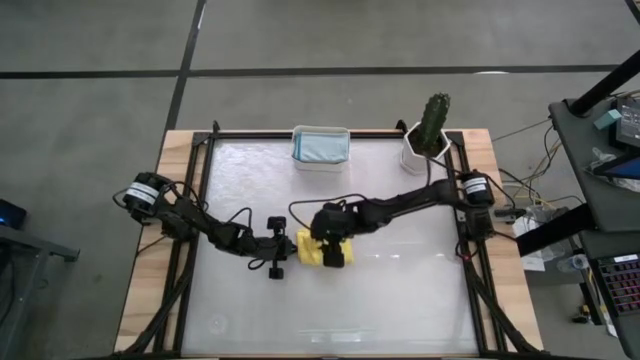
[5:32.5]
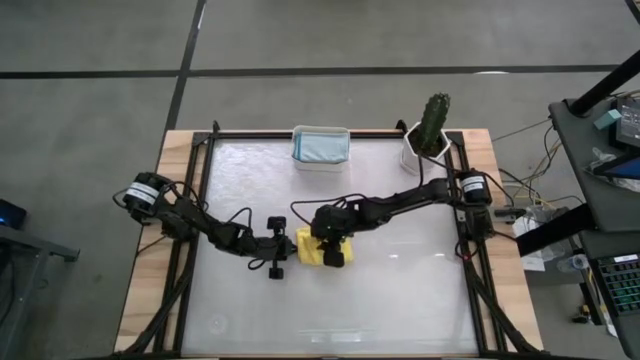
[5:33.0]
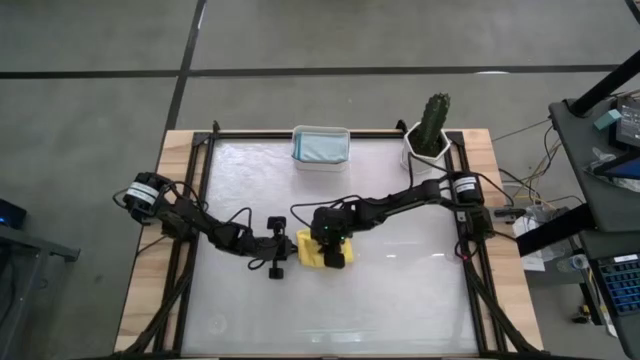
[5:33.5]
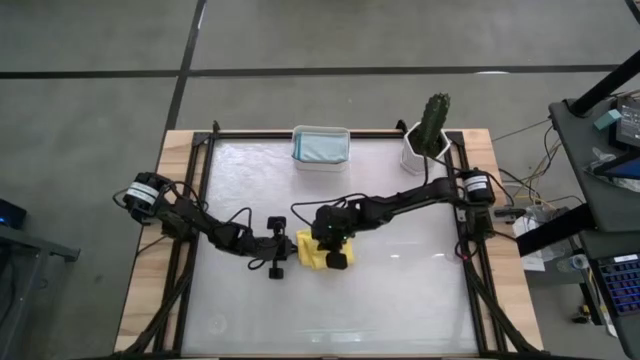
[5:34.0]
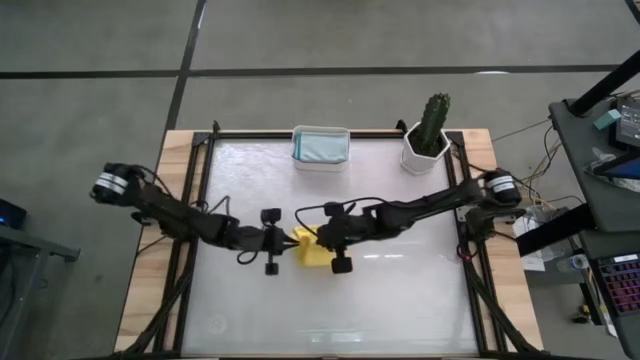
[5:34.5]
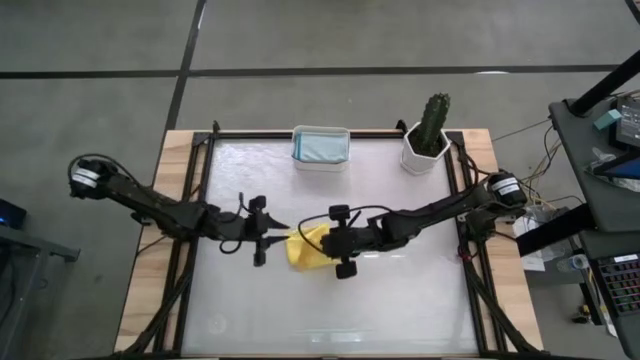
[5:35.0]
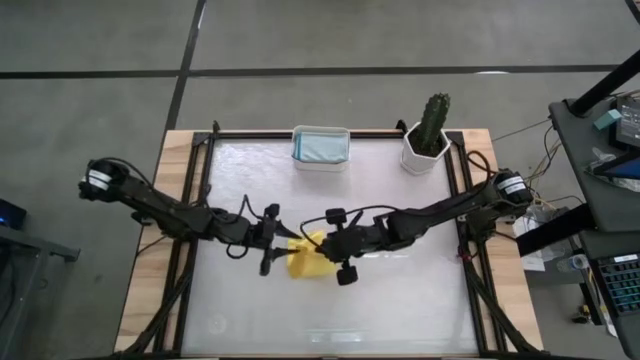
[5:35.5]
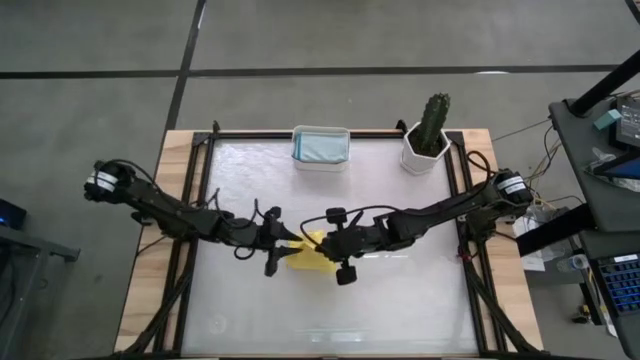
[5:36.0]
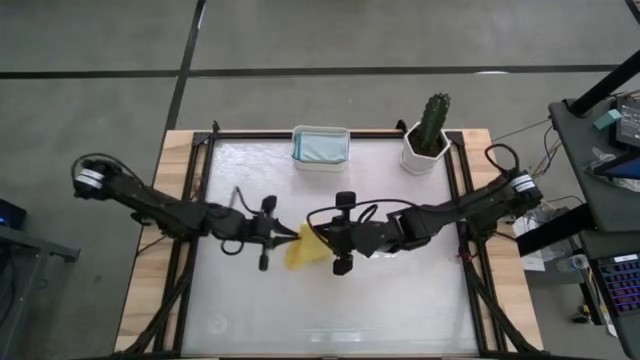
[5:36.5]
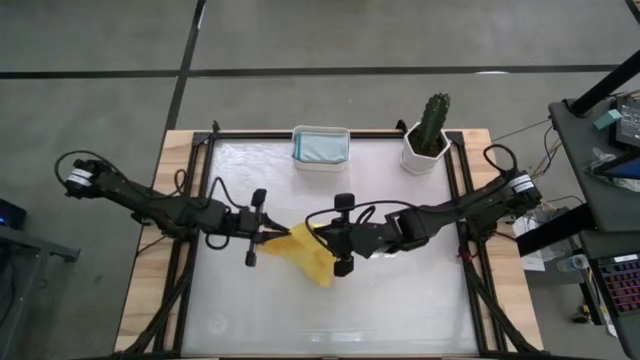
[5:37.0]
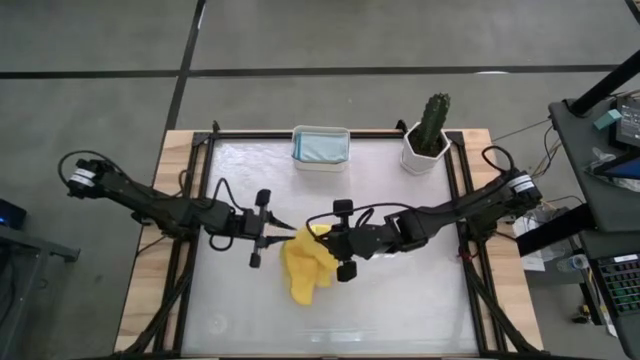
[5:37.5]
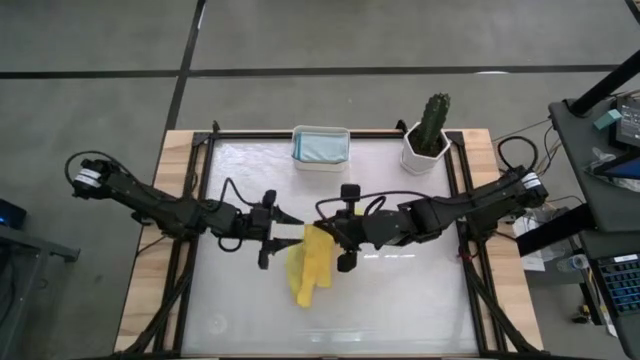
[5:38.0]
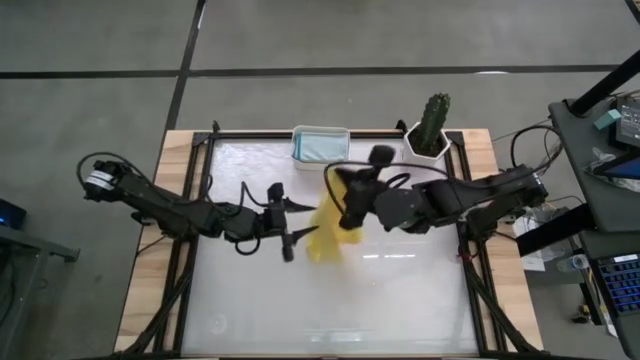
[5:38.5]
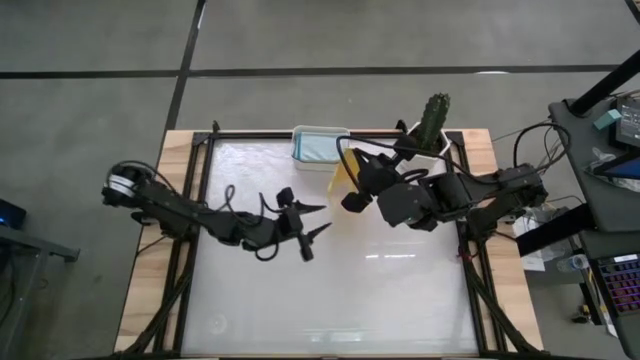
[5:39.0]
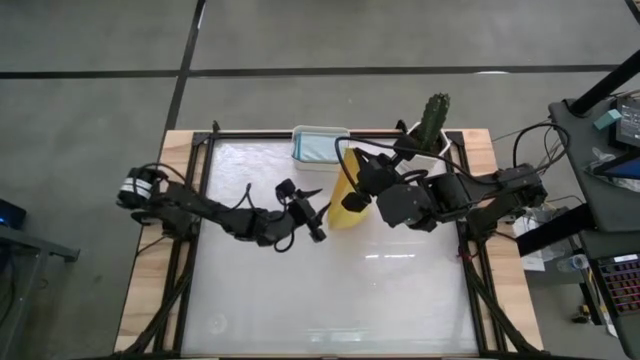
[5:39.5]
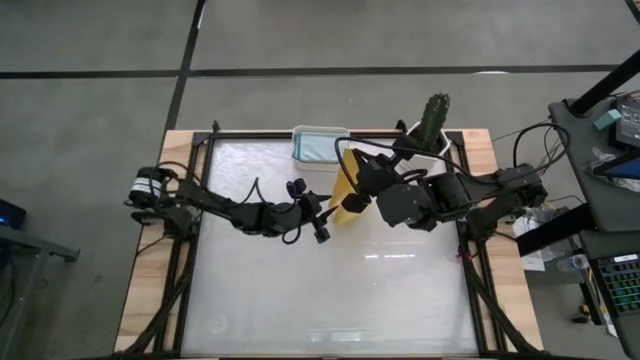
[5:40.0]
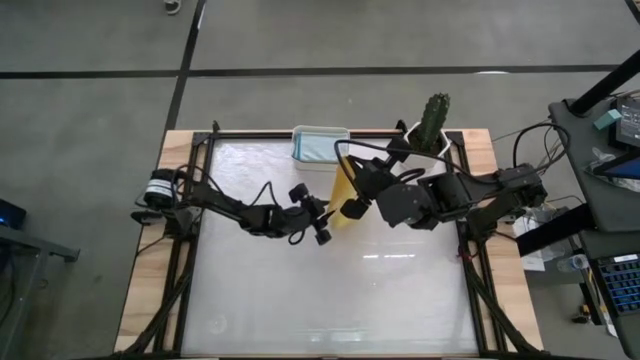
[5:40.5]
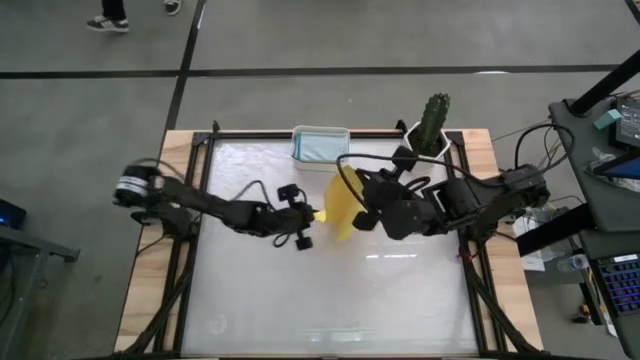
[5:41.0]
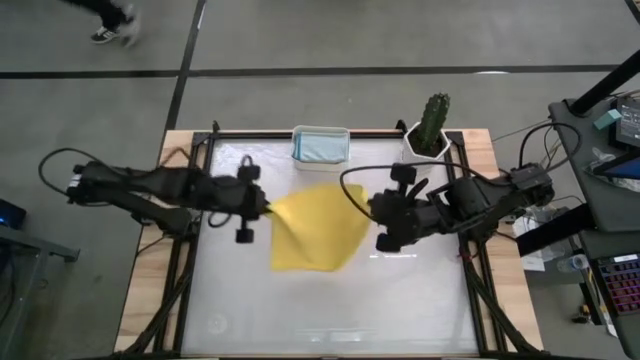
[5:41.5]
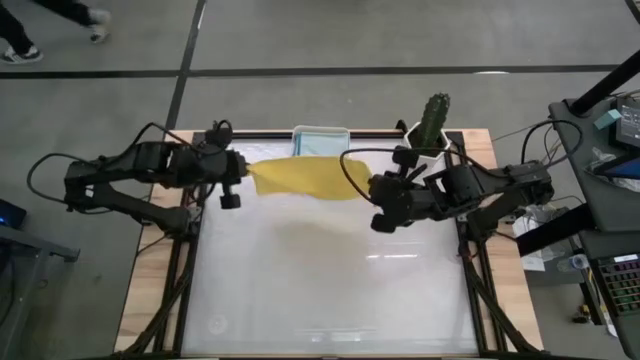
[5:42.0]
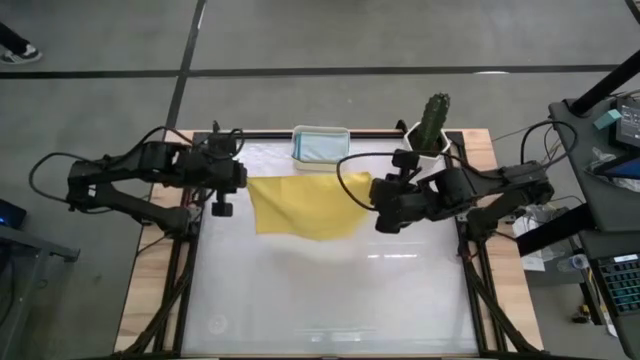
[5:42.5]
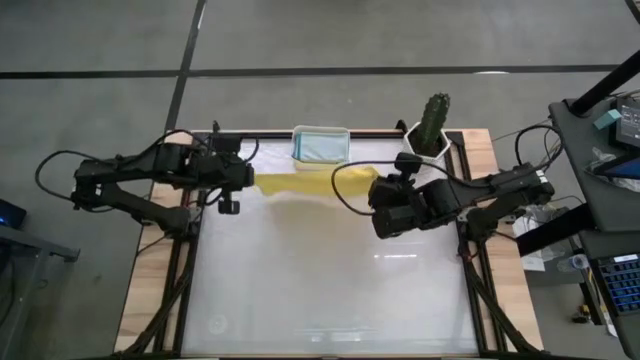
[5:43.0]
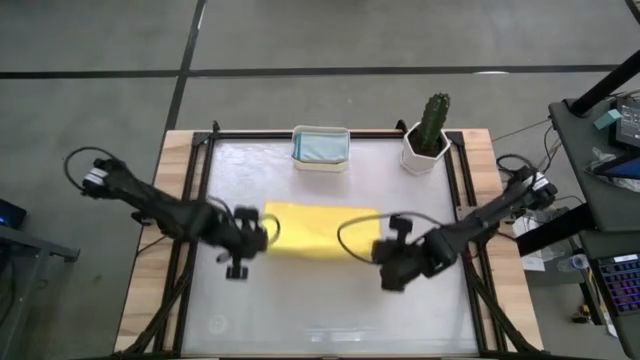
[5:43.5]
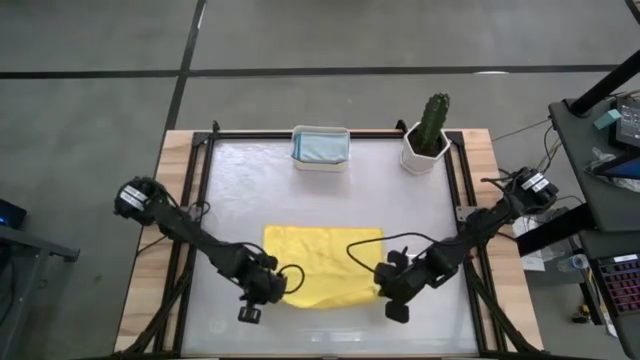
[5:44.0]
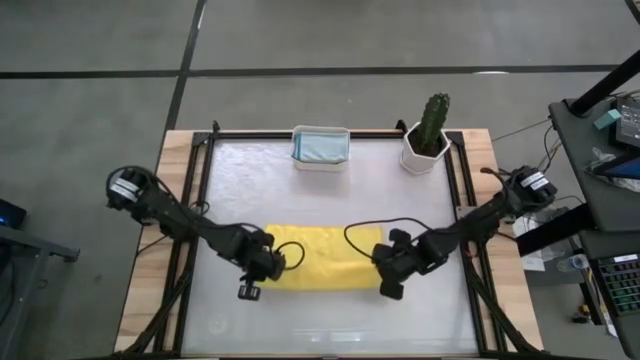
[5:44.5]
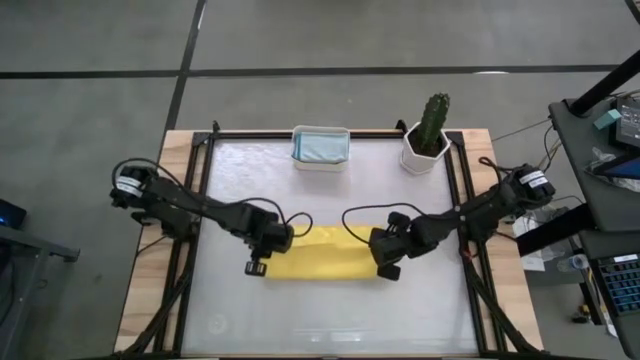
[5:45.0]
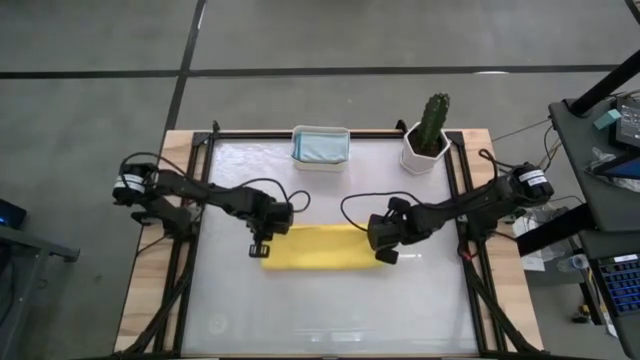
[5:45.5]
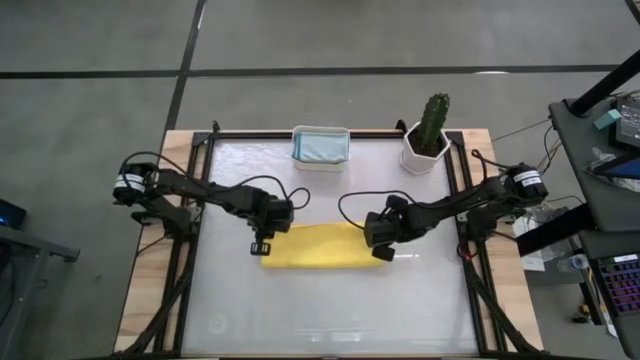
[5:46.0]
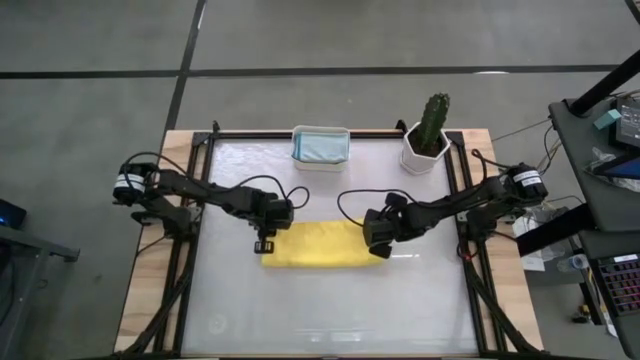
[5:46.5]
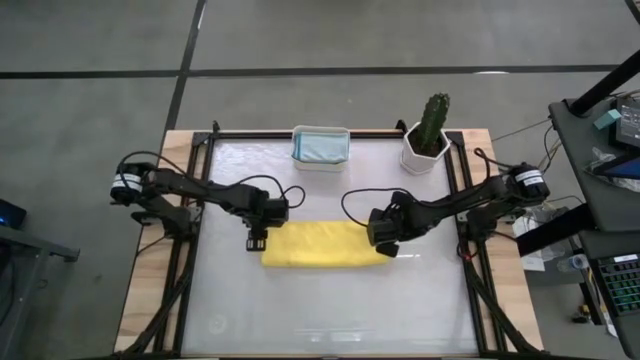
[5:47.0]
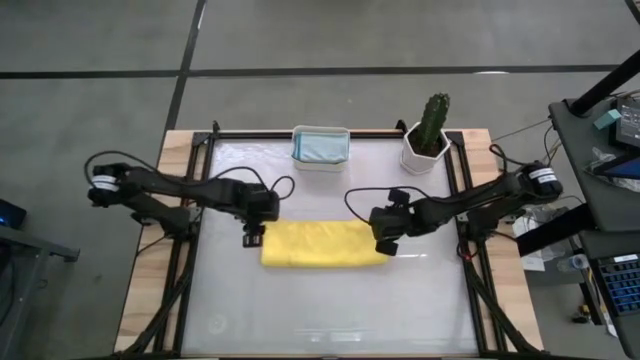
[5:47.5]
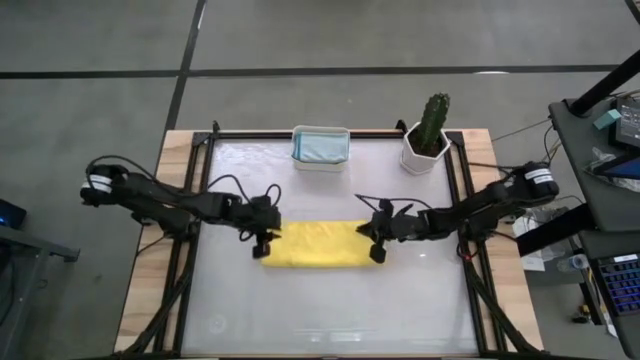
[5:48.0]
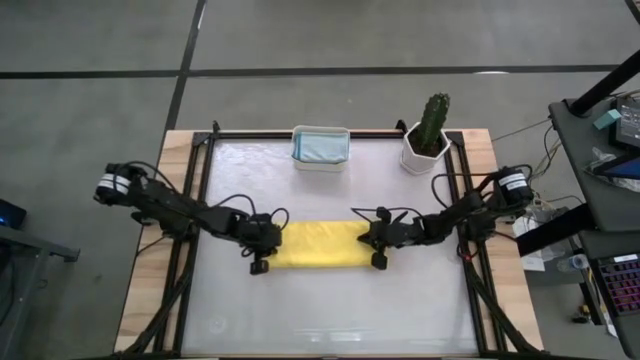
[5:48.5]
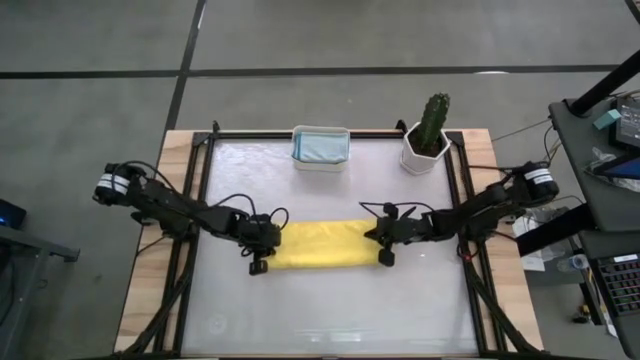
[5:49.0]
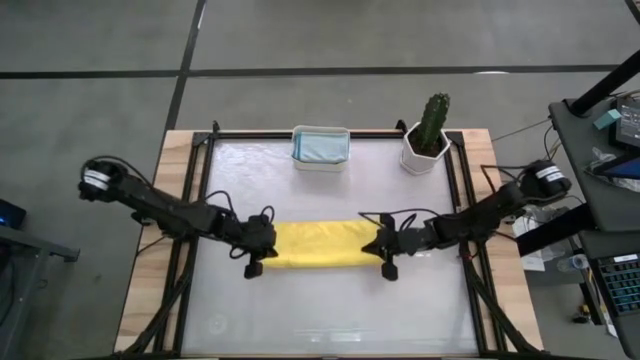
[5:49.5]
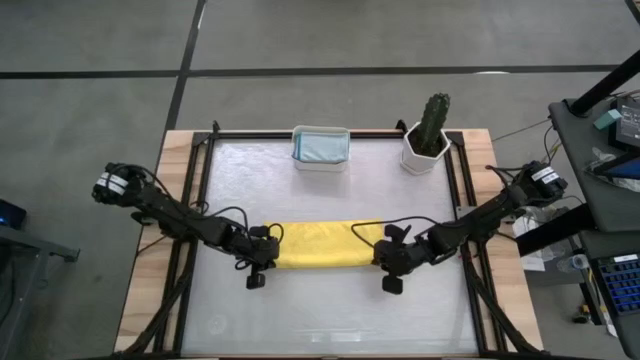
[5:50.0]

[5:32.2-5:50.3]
Task: Fold microfiber towels
Fold the yellow cloth
